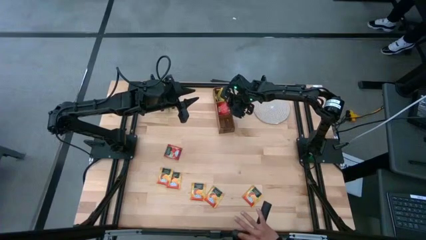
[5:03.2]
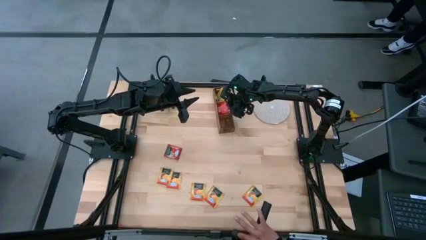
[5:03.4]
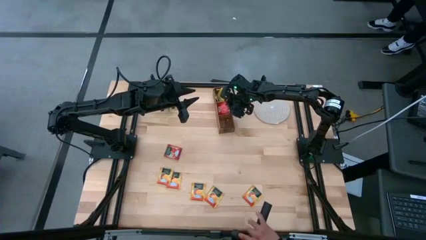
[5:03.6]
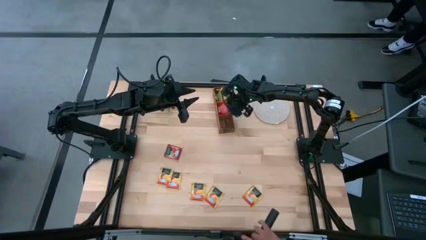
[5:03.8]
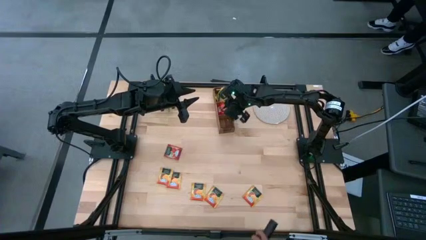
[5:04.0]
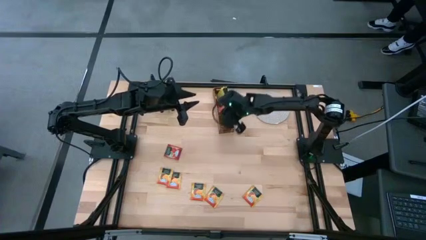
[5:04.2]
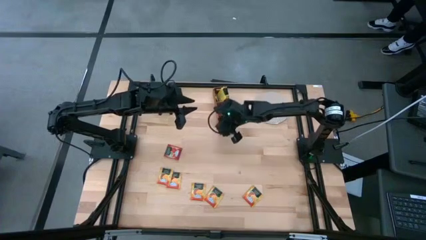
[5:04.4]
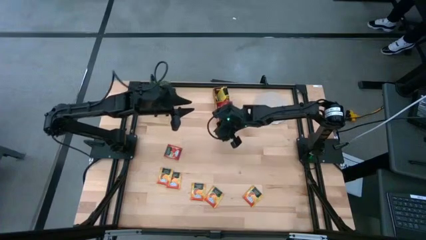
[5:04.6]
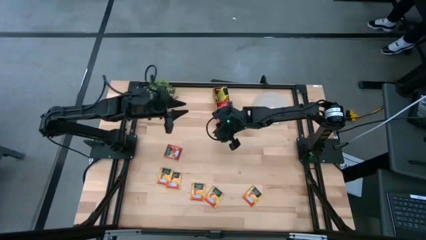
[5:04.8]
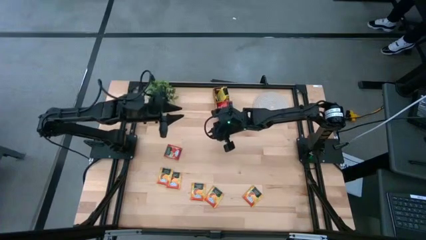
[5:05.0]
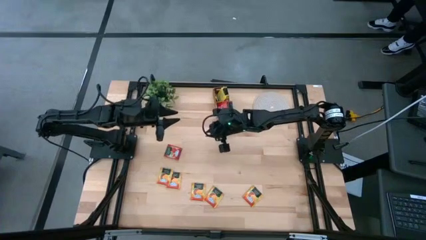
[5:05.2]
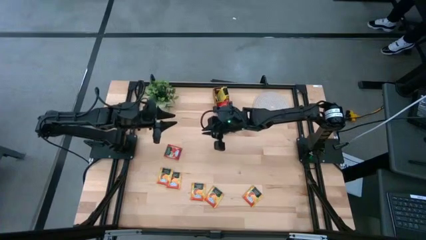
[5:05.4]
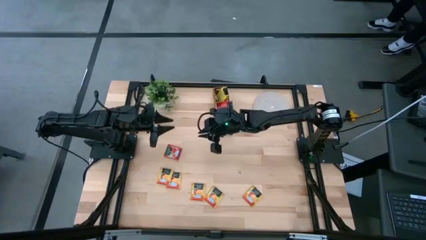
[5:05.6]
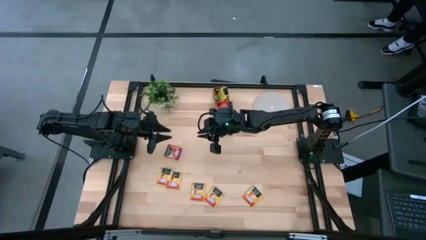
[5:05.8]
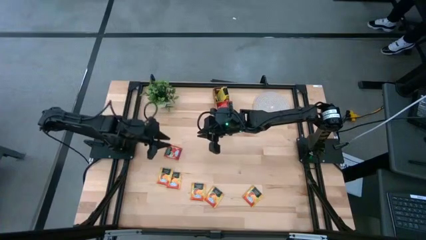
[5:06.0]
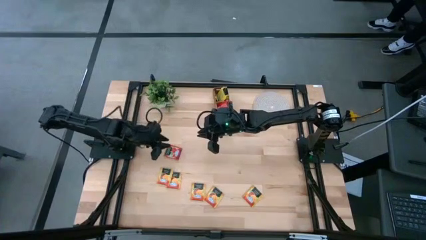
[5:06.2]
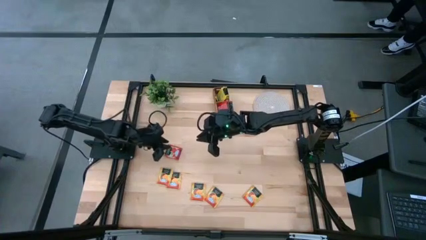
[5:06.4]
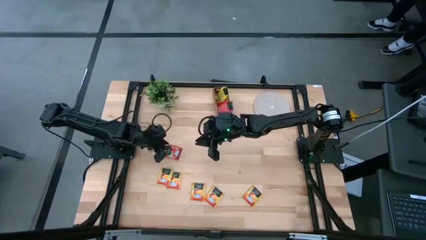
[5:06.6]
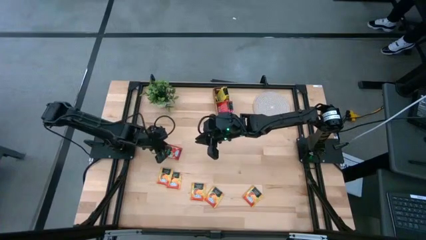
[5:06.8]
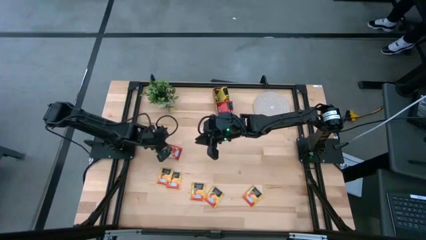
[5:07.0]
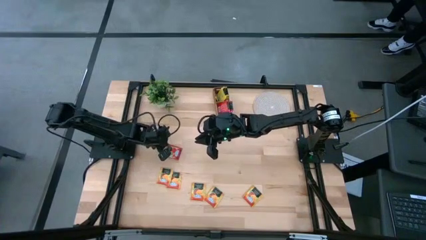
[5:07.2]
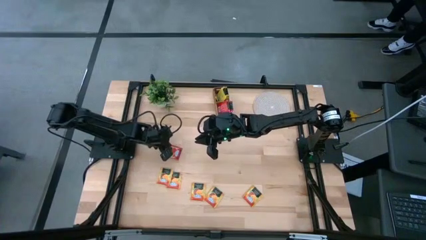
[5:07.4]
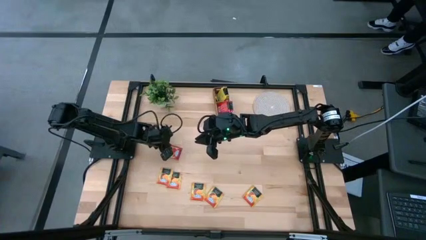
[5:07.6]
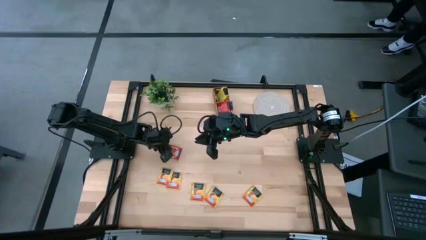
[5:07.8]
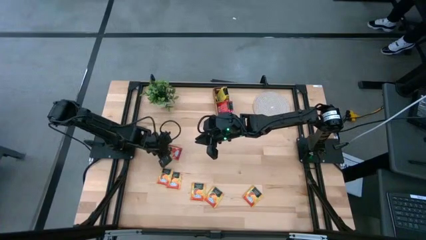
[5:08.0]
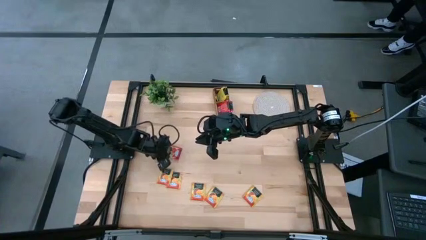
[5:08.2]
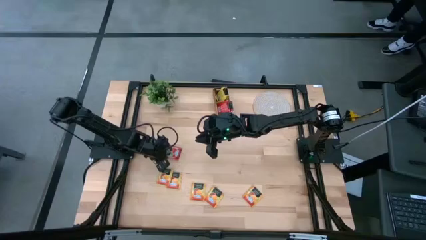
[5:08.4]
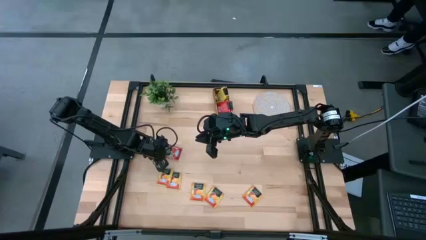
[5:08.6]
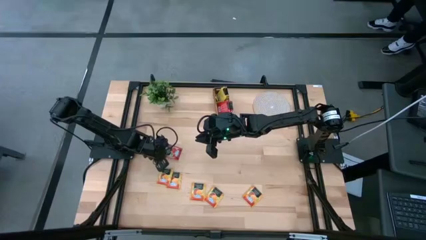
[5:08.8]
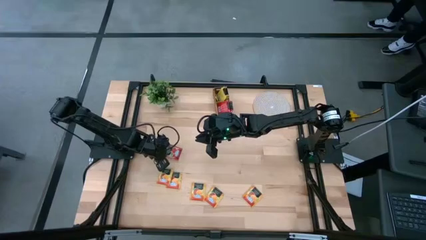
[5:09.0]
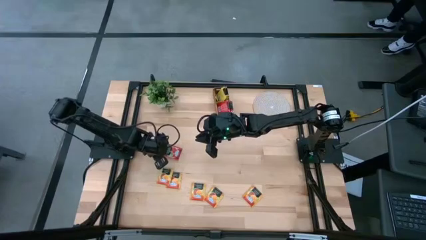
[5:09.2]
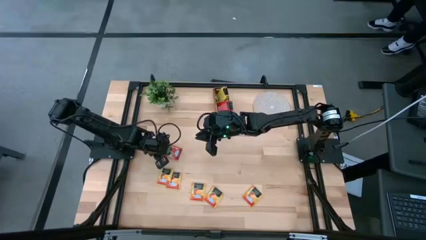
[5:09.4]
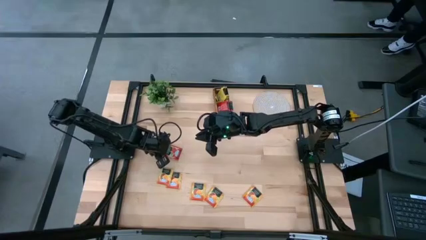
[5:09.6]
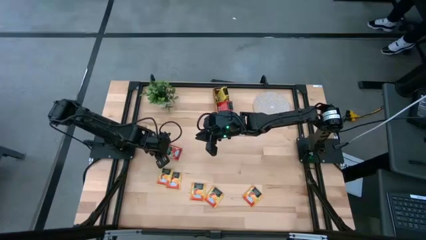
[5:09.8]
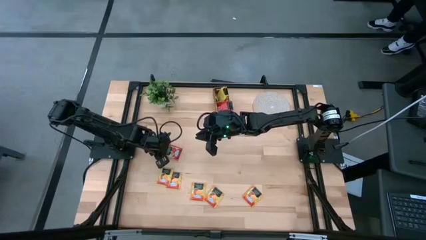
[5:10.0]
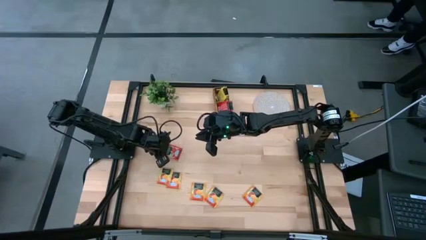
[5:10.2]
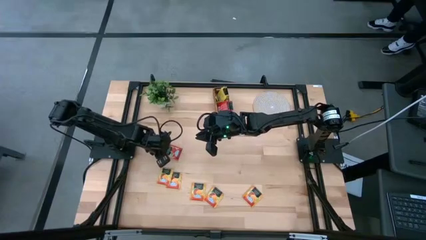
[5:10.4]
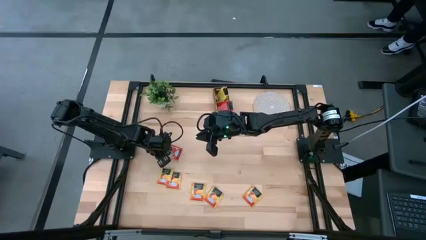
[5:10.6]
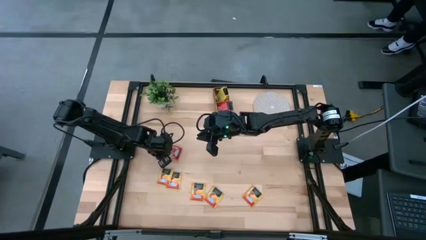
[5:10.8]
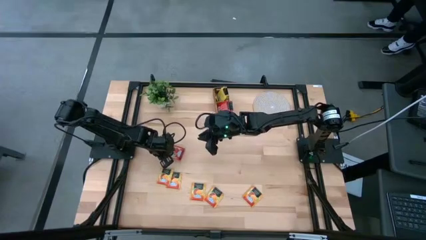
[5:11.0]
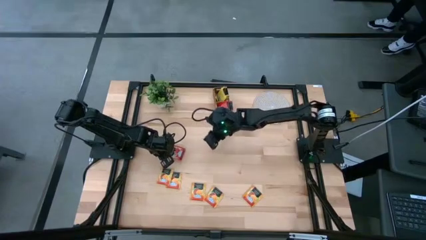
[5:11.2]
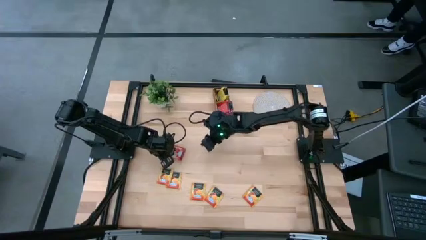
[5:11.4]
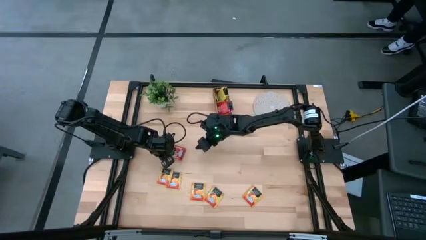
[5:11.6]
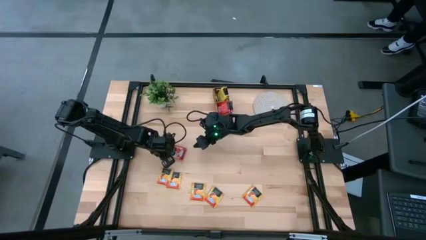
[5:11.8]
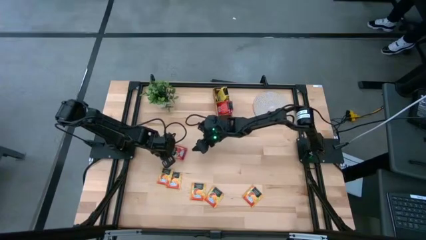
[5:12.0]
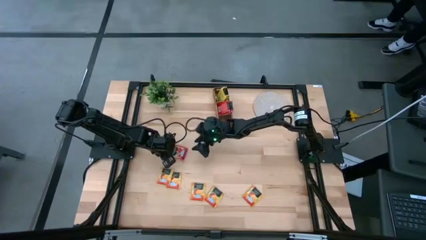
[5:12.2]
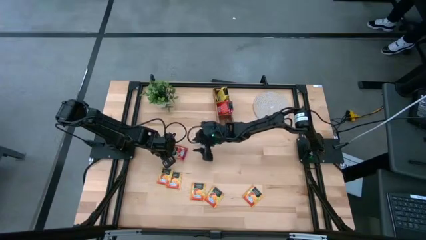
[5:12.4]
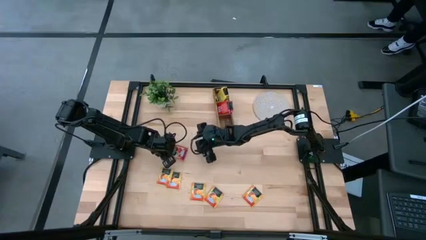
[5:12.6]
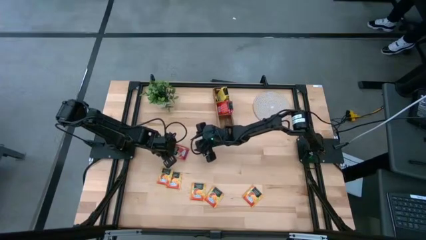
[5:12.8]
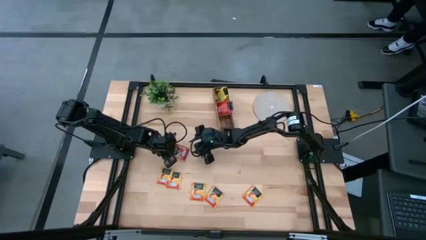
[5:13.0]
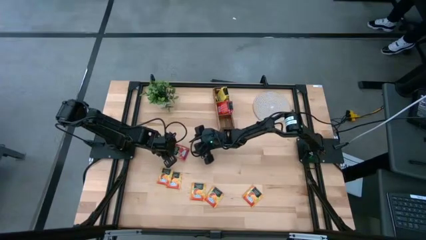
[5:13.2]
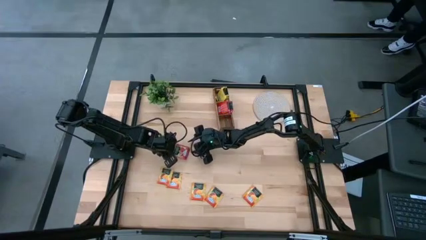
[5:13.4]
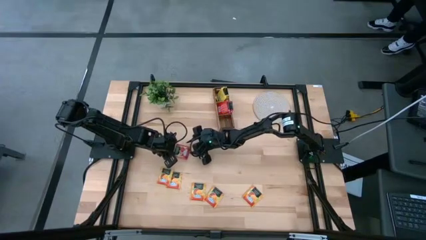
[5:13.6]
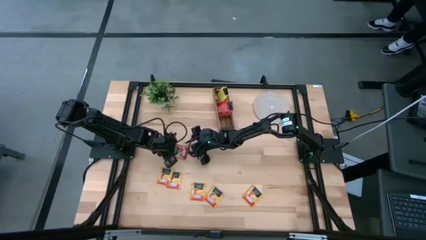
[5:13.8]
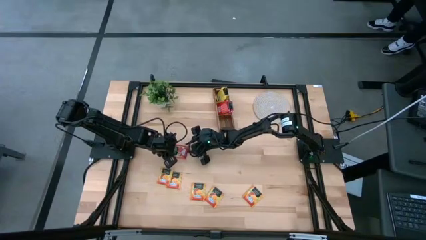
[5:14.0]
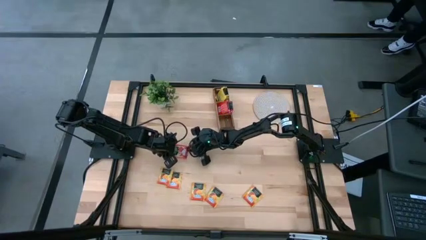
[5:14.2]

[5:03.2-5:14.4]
Task: Pick & Place Tea
Put the red tea bag into the middle section of the wooden organizer

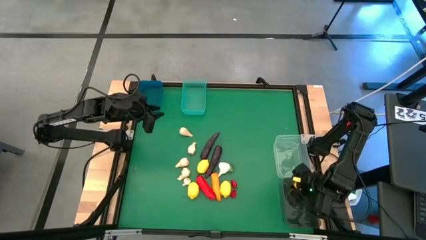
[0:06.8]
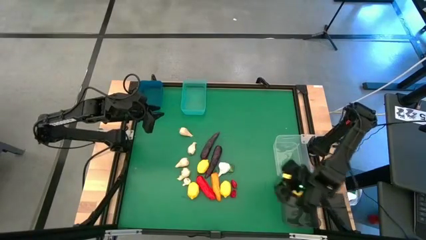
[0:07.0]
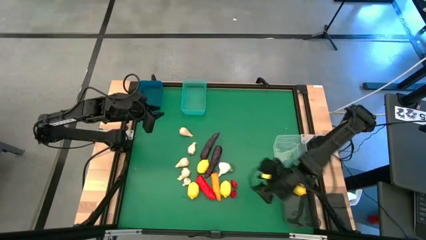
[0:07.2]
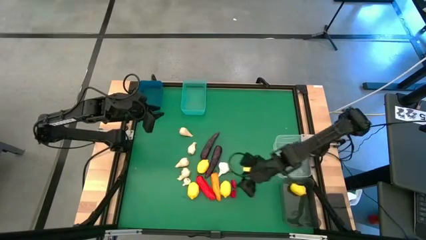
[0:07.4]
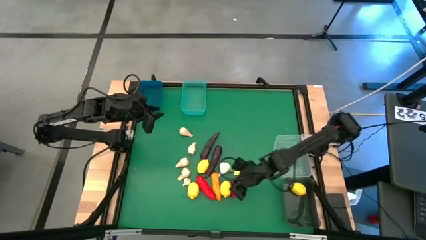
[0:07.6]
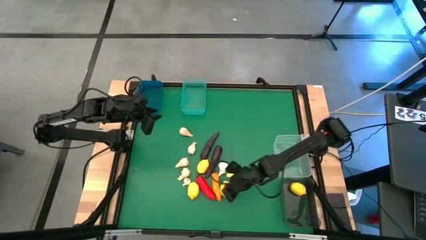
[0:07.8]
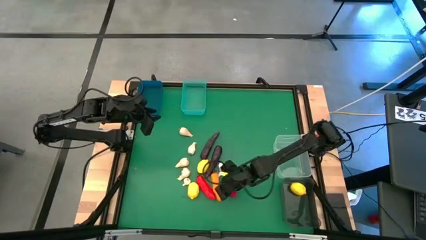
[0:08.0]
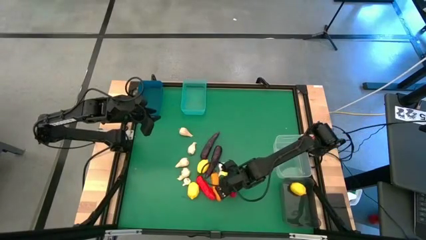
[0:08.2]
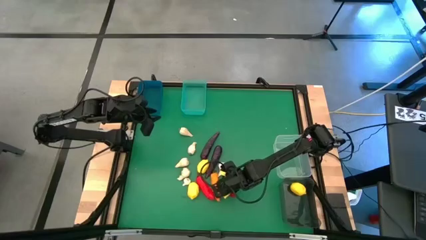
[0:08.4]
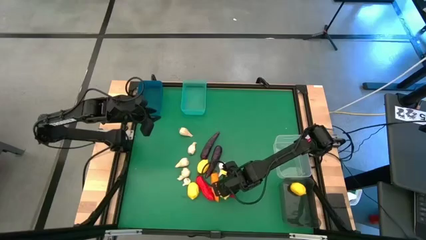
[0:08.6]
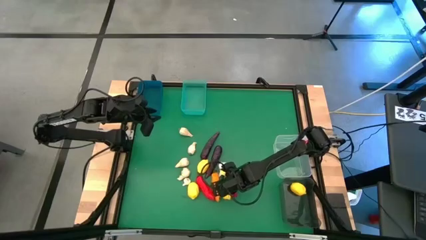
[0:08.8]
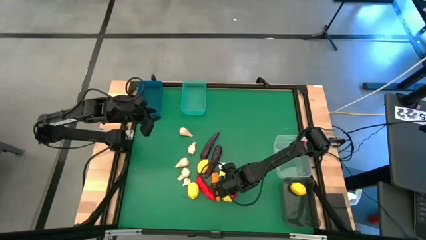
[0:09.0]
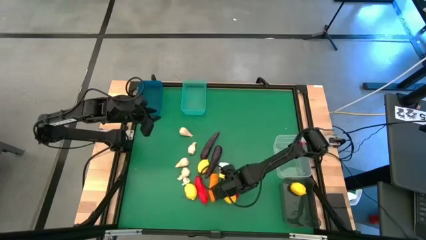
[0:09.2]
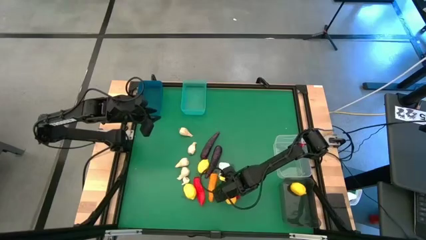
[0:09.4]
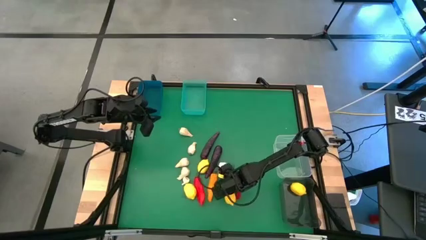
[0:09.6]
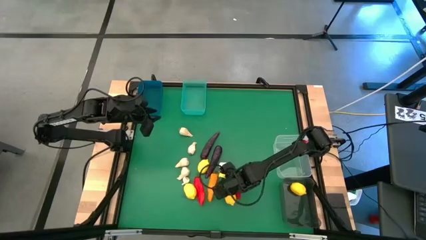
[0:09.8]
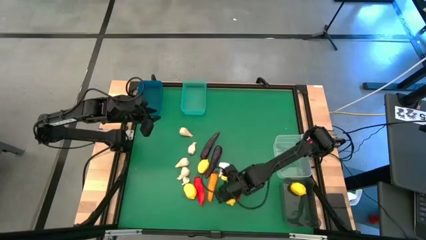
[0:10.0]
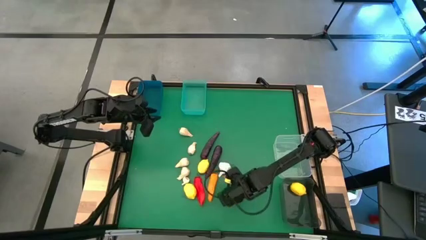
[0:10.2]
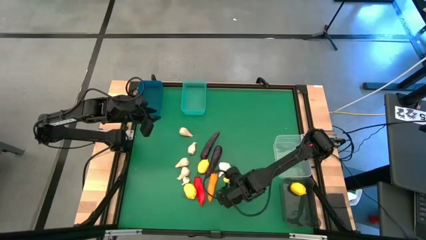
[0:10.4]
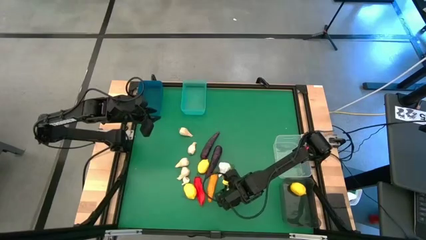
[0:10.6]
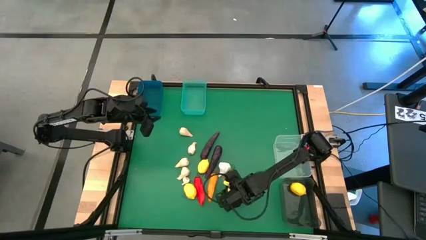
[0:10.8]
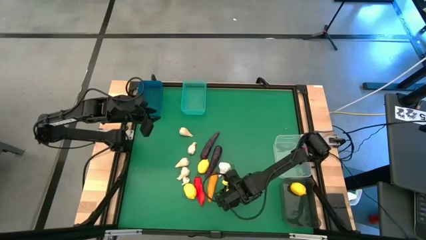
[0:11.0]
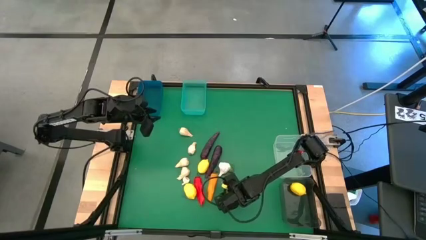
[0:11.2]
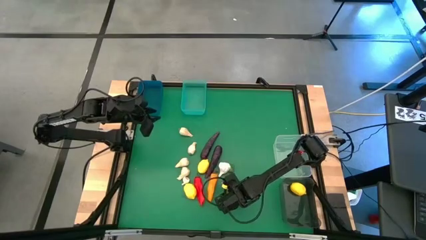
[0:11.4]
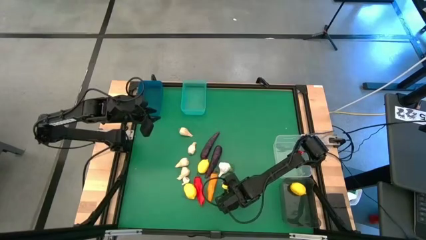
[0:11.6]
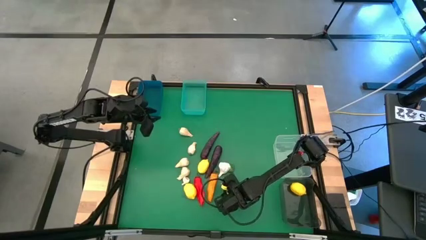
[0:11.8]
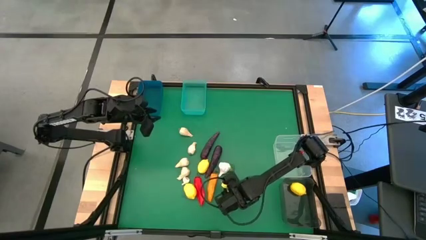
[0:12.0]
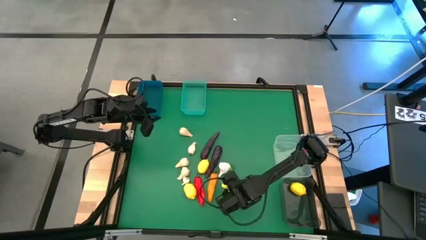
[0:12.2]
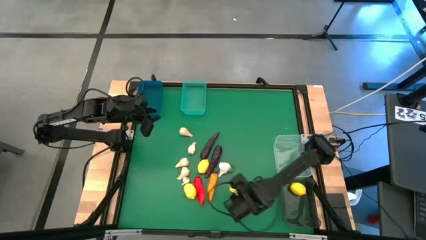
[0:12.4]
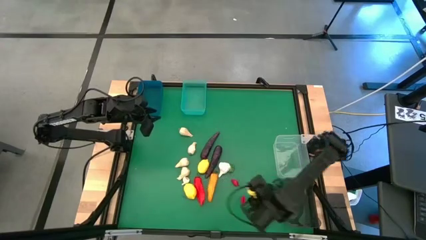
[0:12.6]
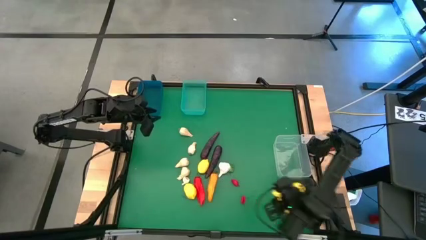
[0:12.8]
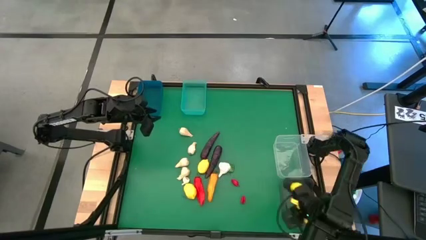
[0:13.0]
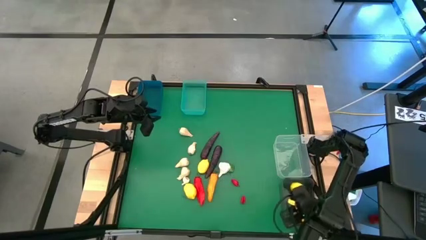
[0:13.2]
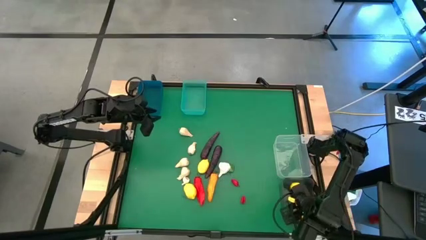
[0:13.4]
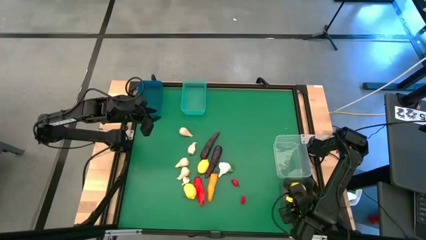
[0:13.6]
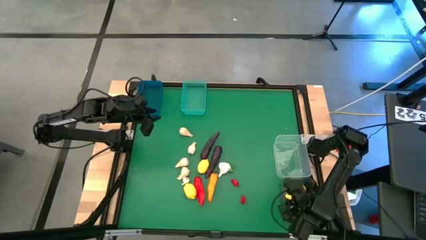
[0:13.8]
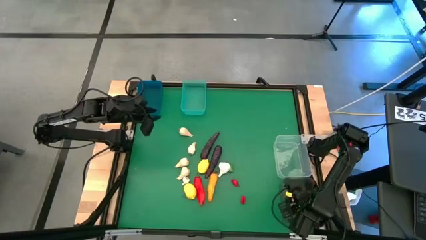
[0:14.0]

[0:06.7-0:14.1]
Task: Sort produce into baskets
Put the yellow lemon into the black bin
